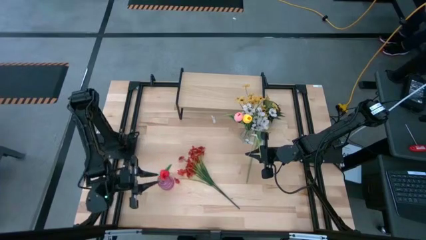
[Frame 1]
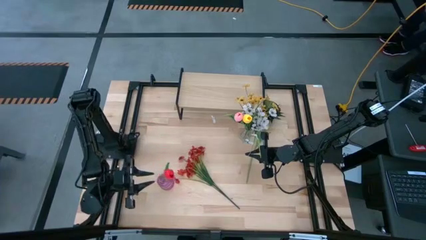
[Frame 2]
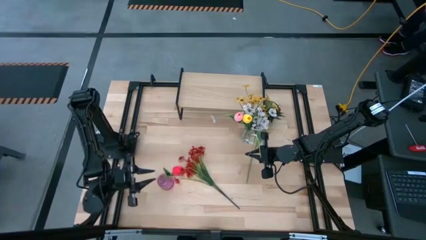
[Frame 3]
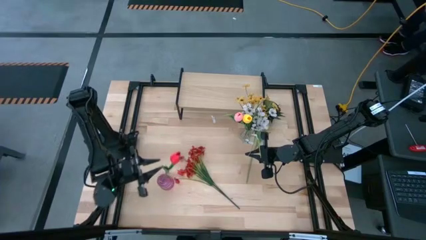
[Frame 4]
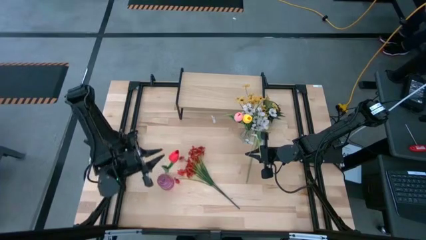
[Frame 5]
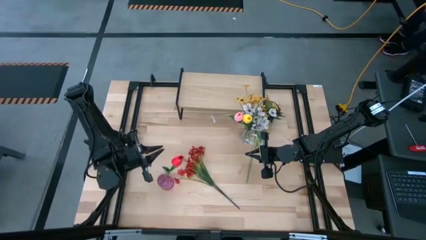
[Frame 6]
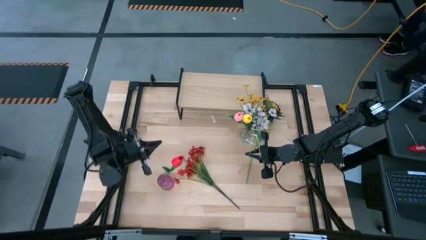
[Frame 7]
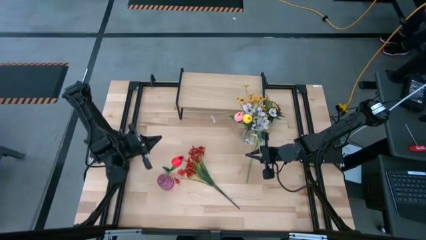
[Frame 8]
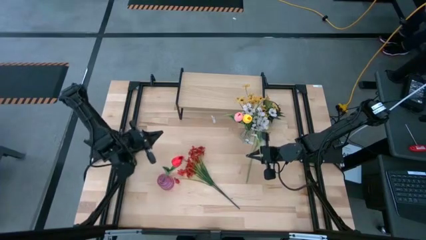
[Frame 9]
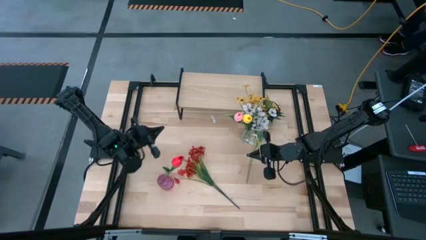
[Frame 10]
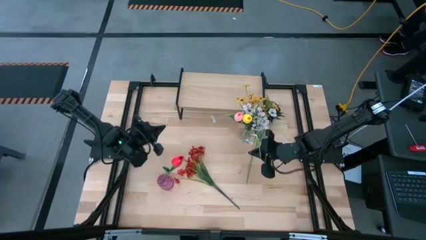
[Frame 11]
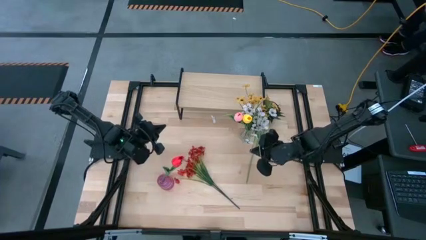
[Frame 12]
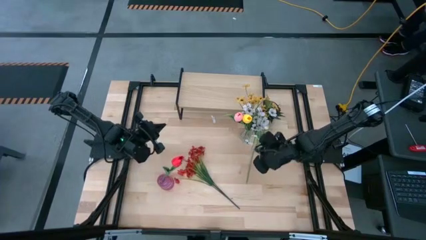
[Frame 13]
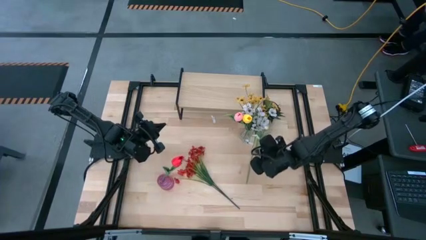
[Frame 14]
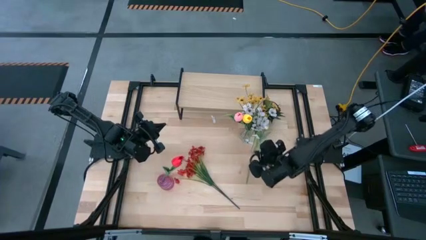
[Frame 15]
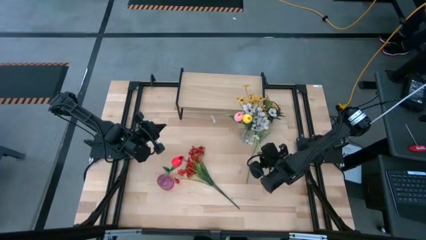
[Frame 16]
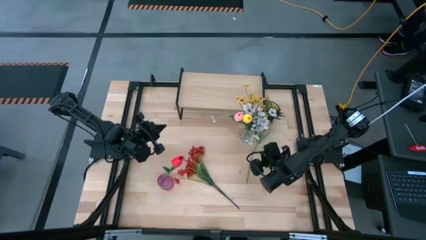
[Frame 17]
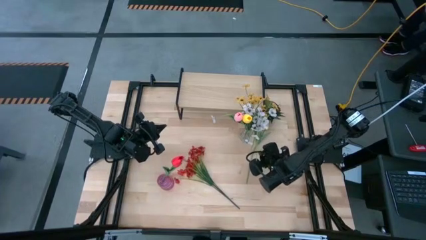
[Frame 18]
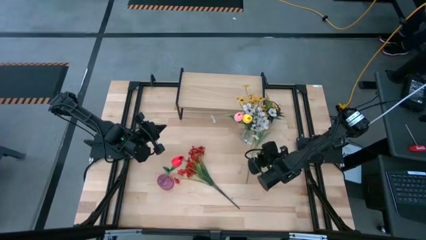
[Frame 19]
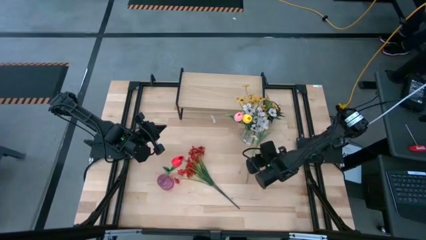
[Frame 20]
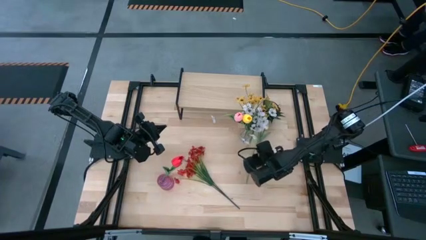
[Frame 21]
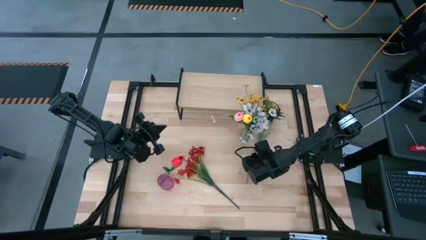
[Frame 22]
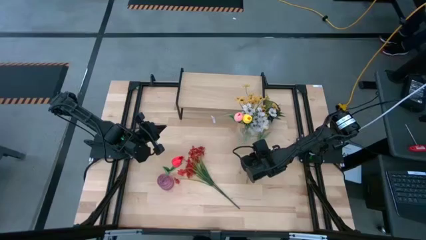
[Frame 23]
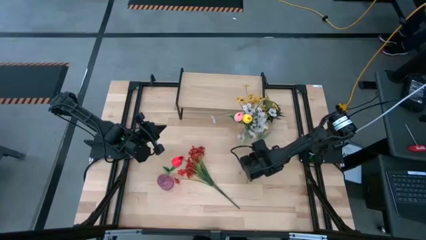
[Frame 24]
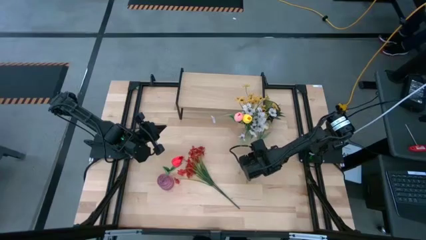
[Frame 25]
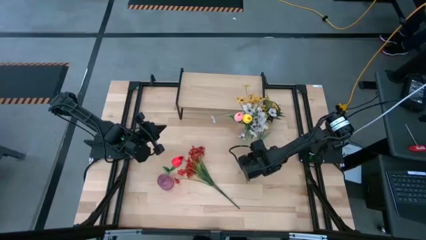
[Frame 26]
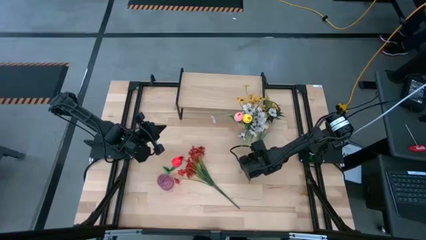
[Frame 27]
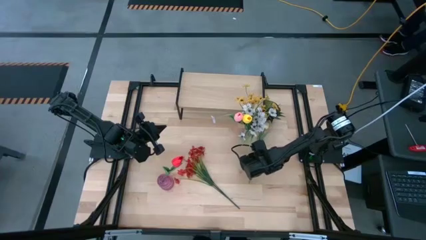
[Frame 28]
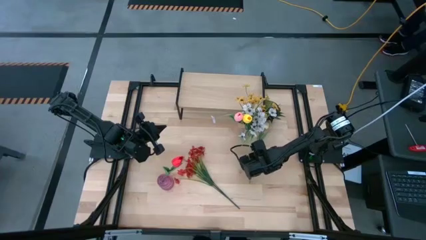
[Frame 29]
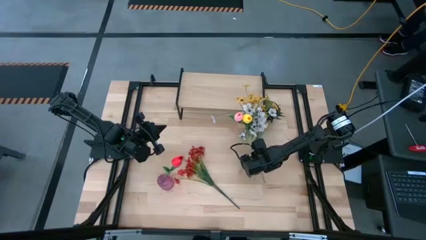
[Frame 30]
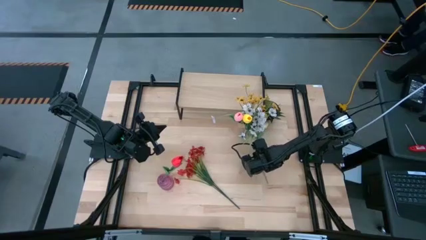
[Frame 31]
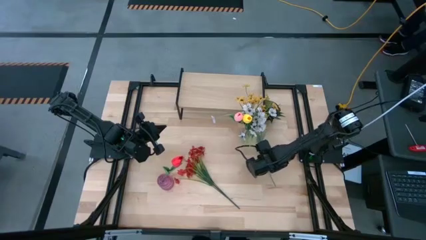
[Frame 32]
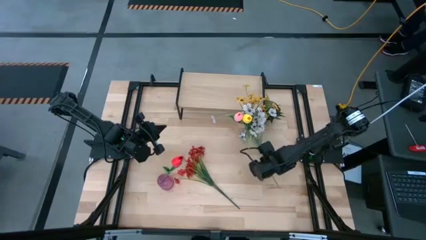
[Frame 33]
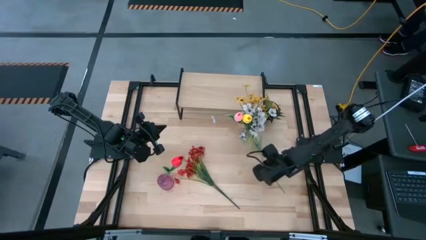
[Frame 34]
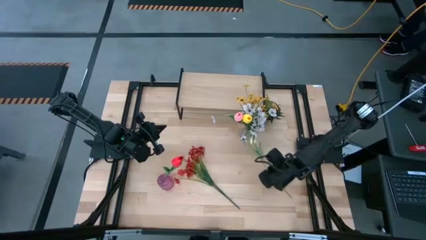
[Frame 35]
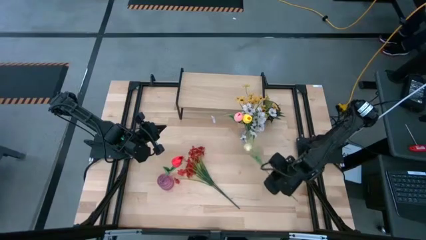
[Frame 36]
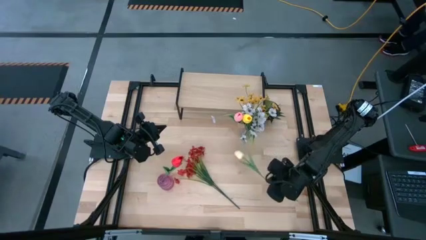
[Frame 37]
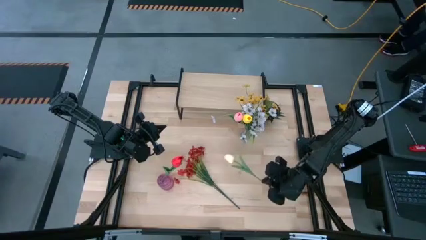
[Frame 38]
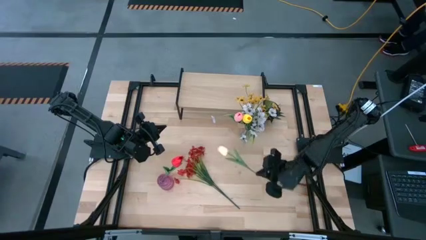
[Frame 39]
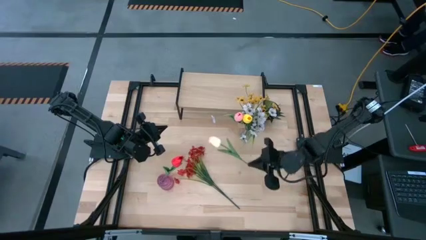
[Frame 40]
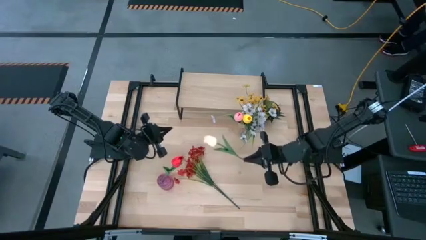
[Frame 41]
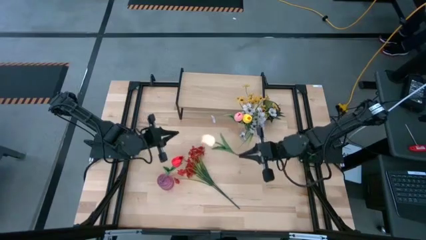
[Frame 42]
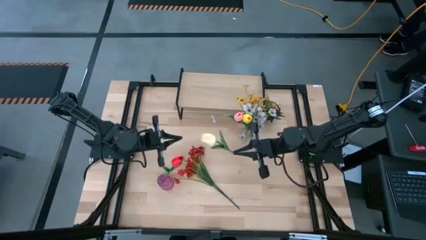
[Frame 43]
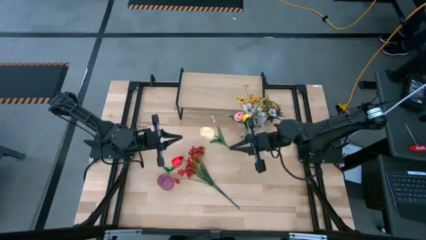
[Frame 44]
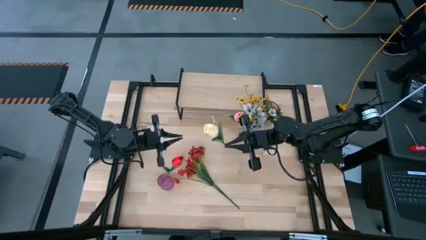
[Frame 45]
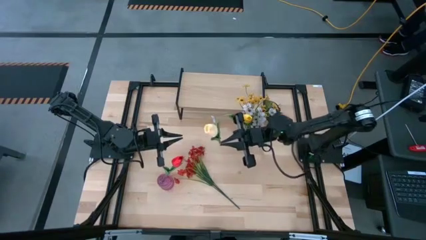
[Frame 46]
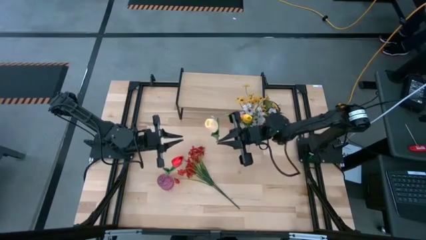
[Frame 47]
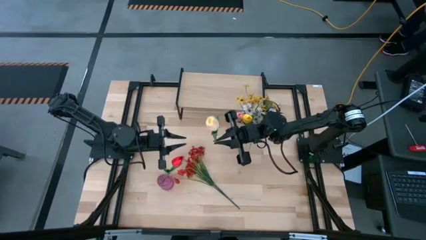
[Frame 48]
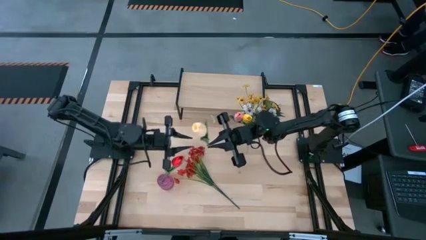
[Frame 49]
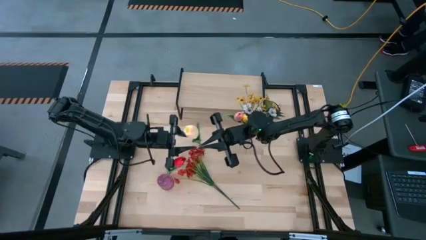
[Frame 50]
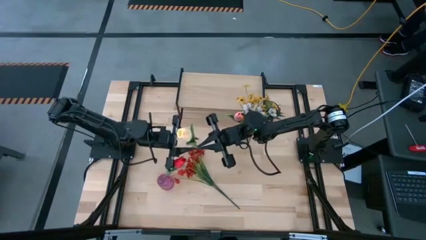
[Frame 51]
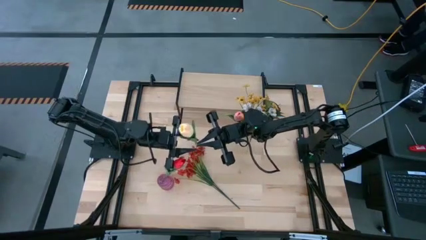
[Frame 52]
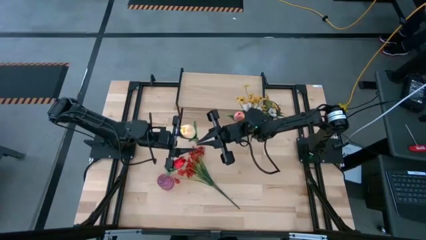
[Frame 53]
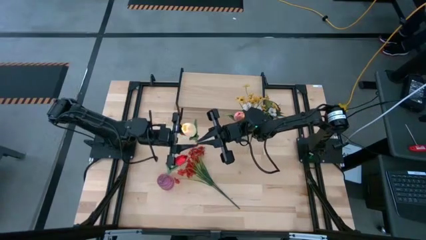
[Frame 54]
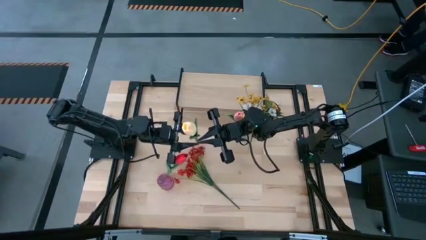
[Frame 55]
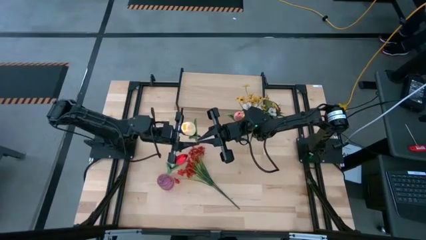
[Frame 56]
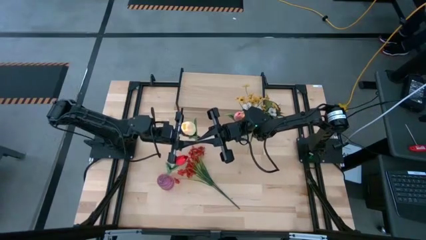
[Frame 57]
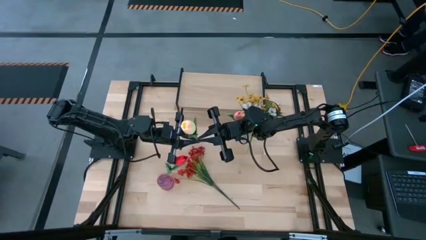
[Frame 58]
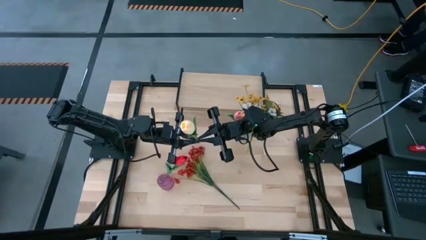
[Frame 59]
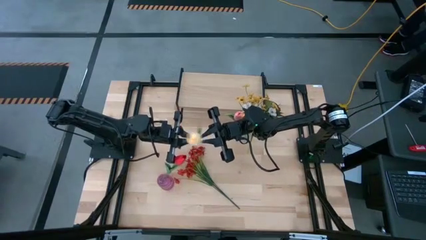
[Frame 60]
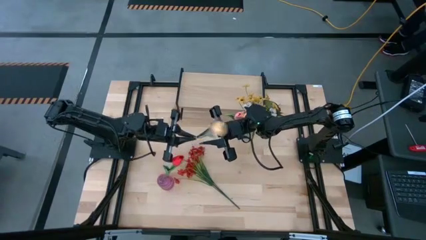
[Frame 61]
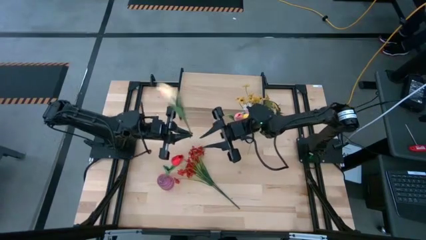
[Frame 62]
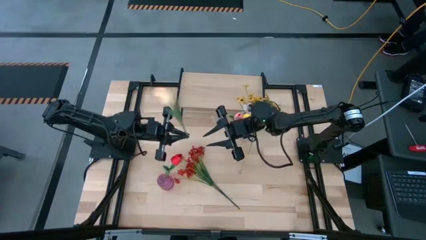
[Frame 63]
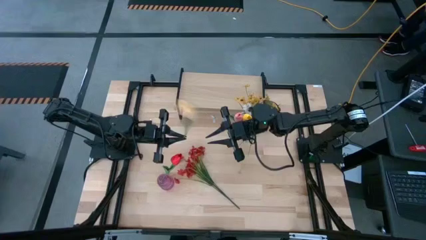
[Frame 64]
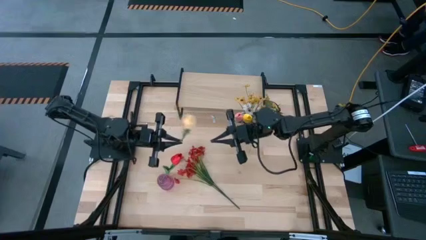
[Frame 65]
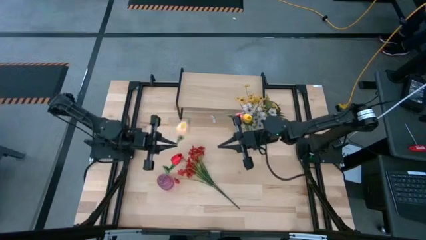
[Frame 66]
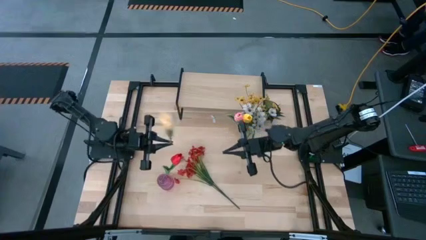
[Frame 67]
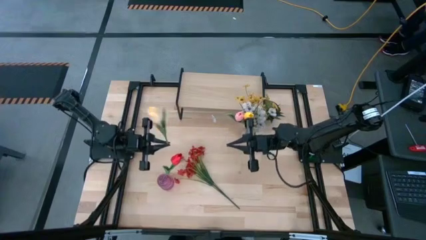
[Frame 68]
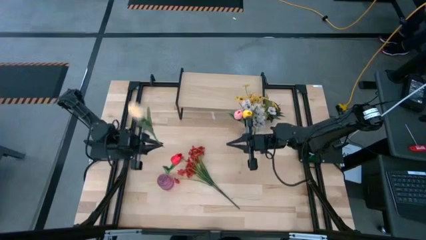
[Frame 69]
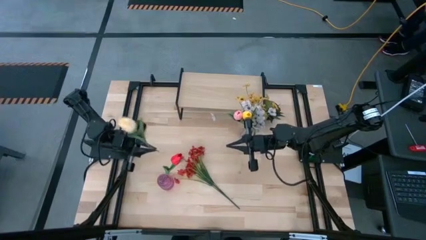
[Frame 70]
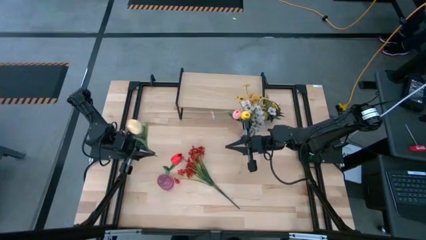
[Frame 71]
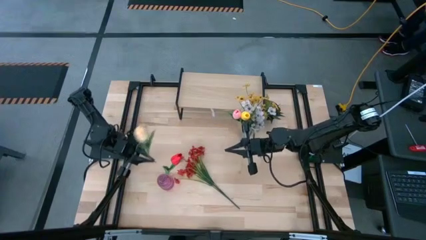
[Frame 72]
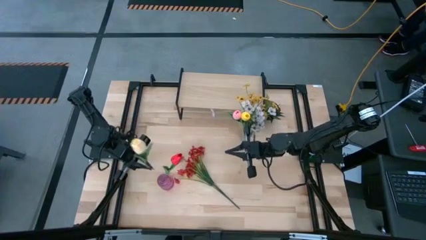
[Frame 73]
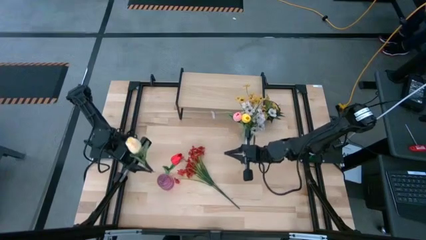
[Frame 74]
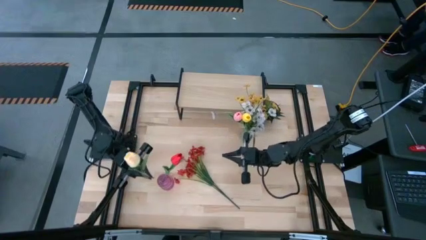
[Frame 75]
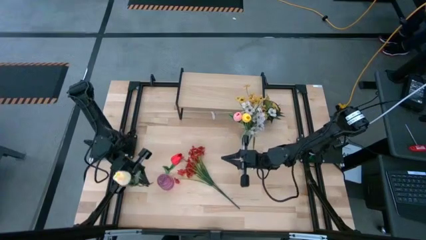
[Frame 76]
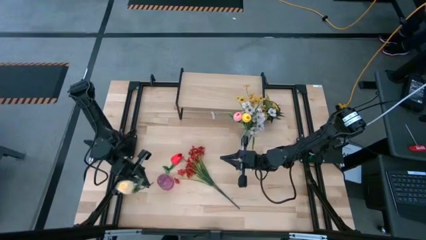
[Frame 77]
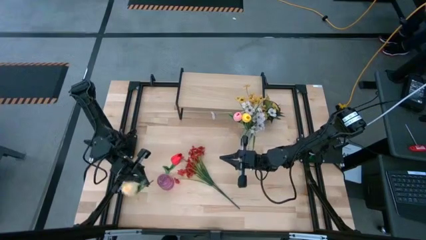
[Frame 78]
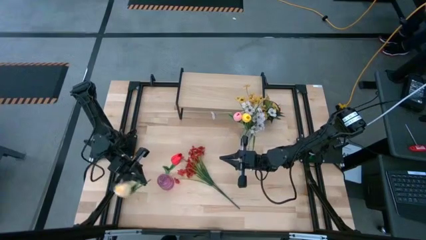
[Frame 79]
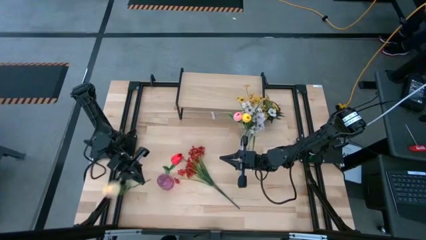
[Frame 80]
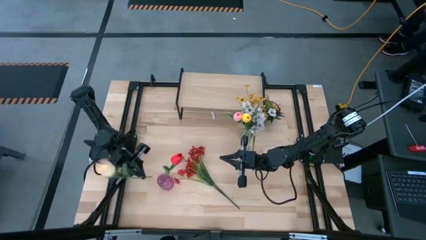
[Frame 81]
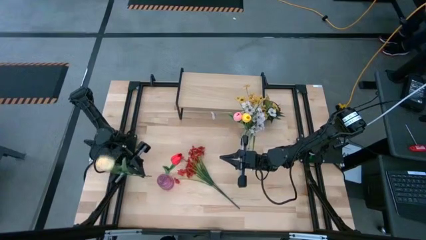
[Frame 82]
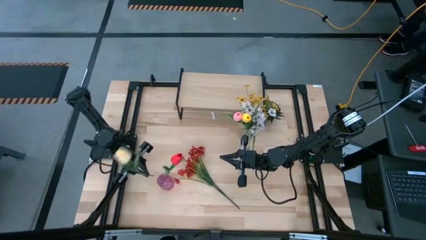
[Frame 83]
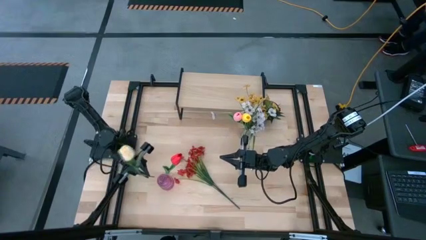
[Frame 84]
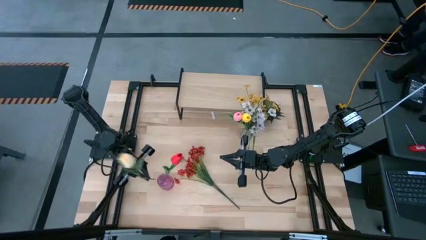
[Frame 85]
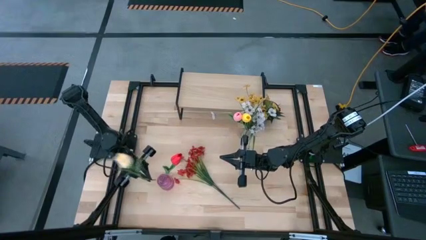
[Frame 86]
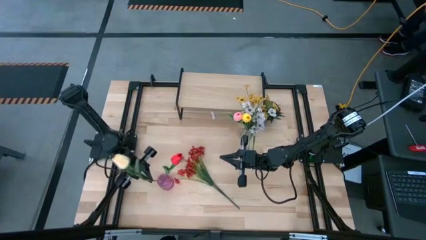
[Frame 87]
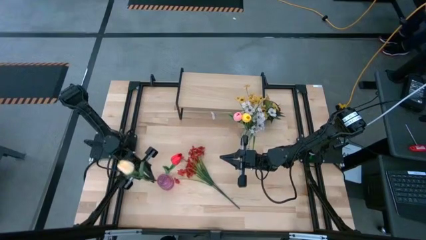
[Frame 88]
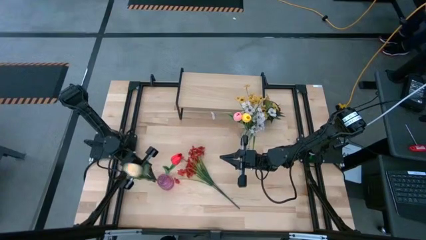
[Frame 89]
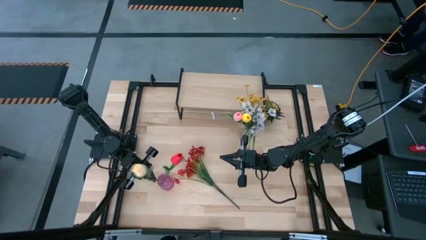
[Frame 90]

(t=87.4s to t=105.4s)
Task: Pick and place flowers into a vace then onto a shelf
Put the light yellow flower into the violet vase
